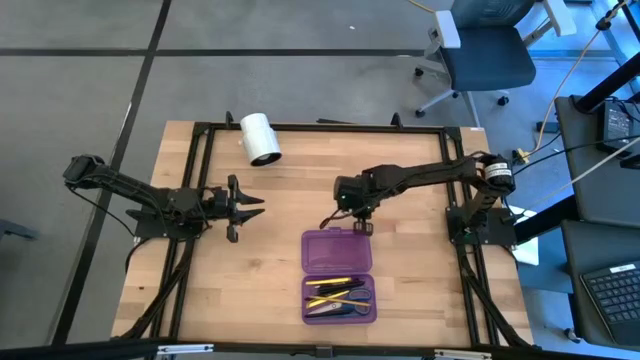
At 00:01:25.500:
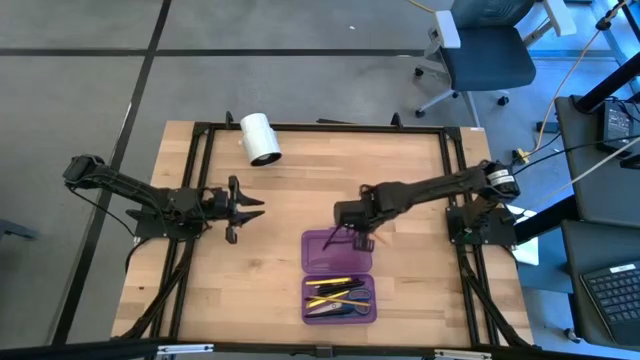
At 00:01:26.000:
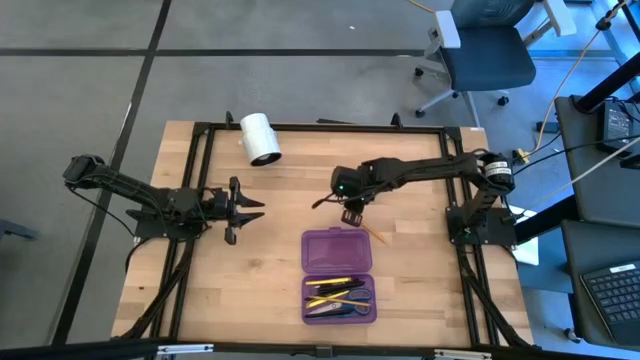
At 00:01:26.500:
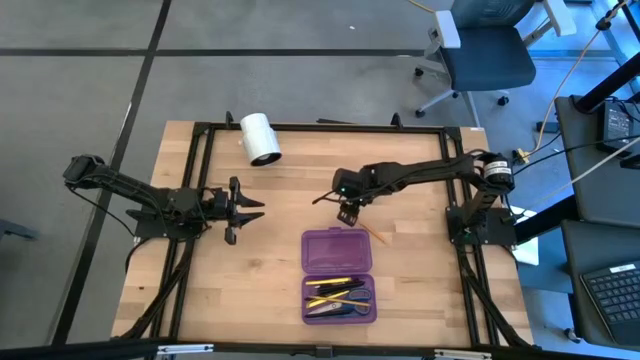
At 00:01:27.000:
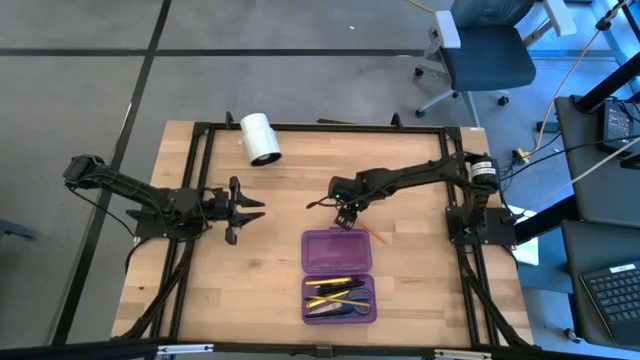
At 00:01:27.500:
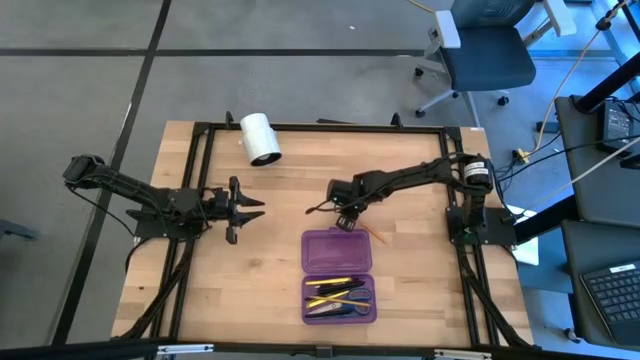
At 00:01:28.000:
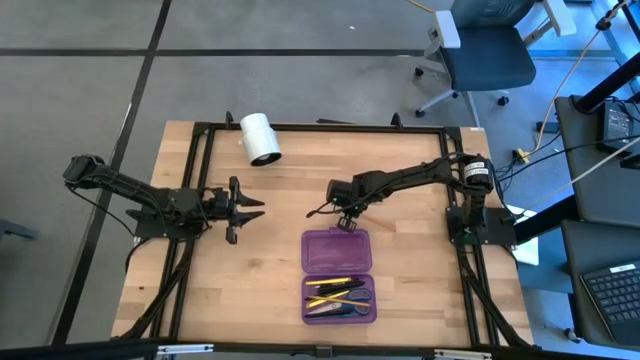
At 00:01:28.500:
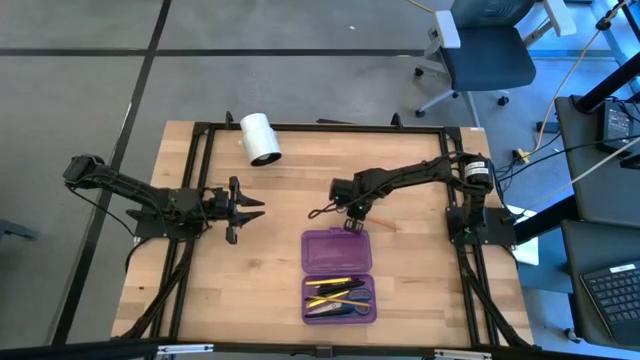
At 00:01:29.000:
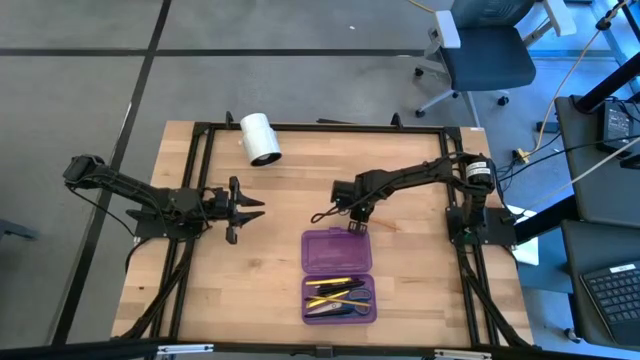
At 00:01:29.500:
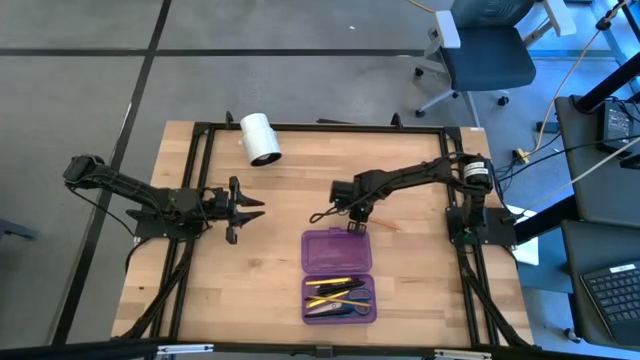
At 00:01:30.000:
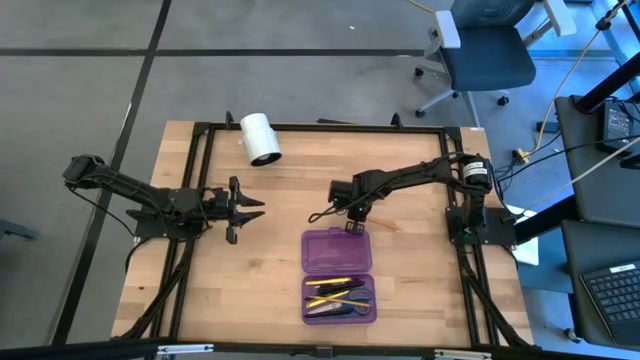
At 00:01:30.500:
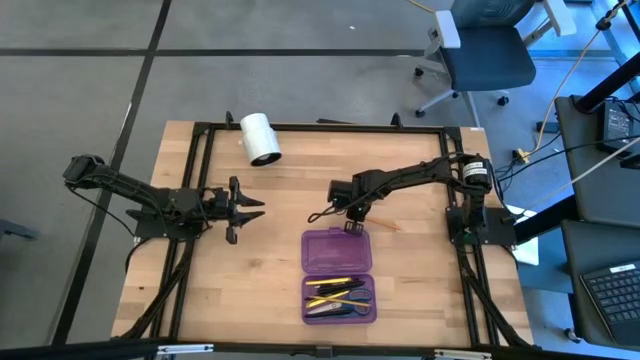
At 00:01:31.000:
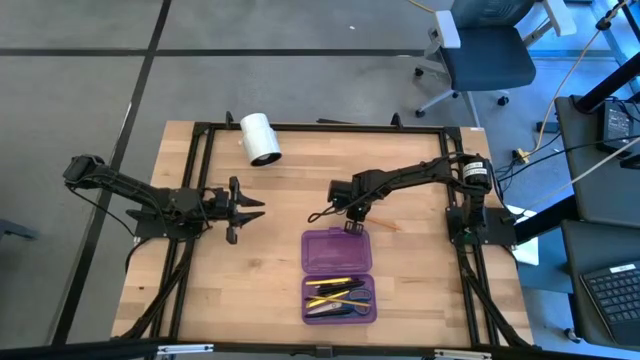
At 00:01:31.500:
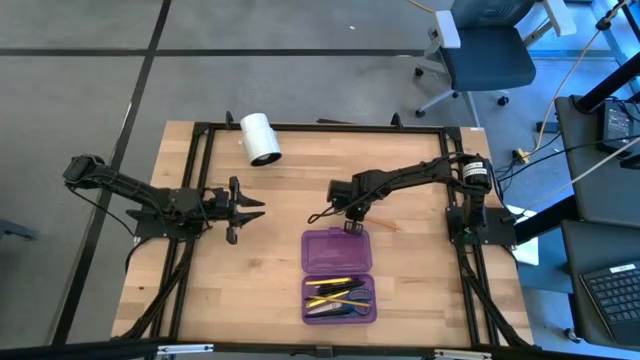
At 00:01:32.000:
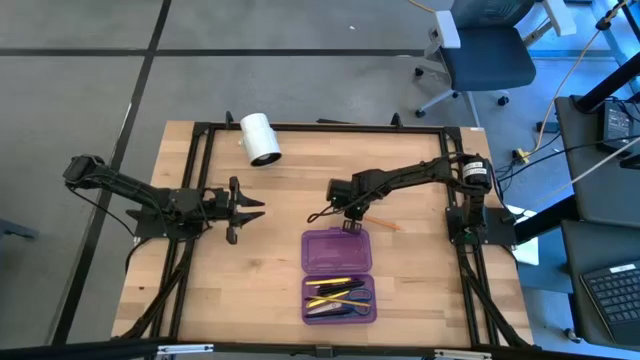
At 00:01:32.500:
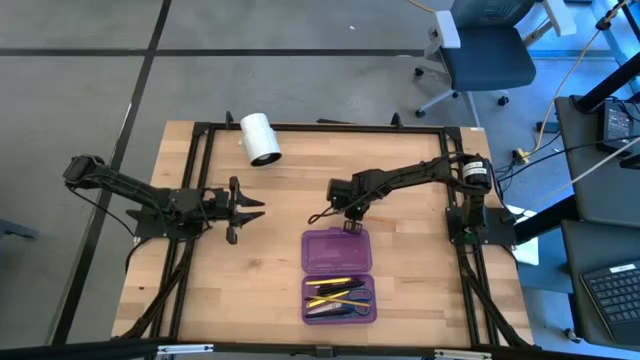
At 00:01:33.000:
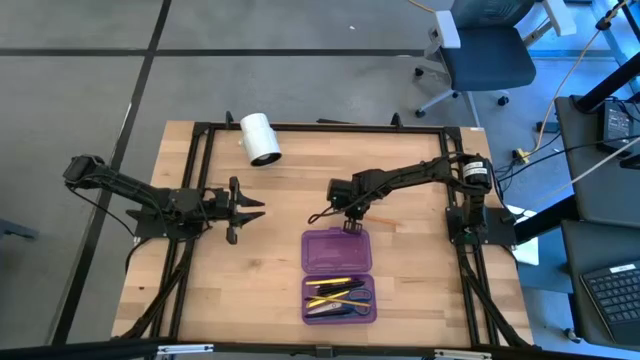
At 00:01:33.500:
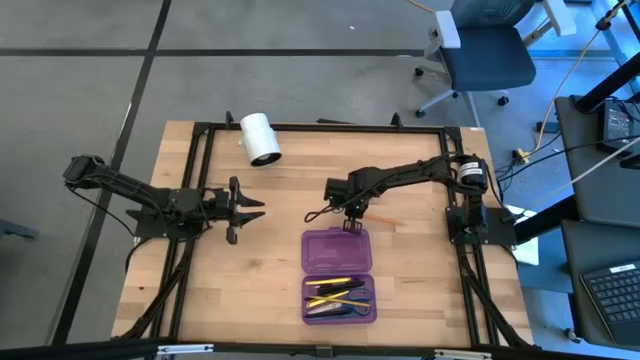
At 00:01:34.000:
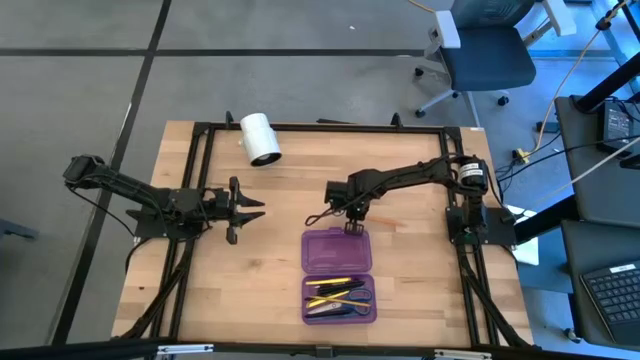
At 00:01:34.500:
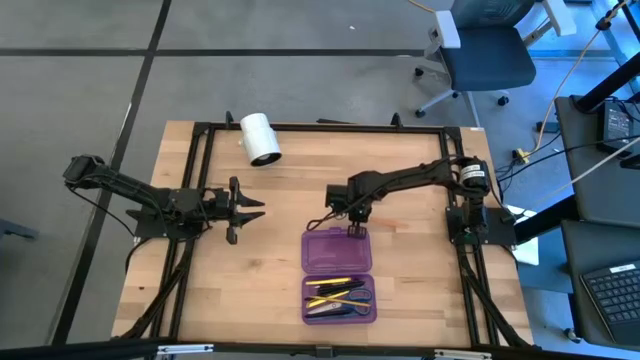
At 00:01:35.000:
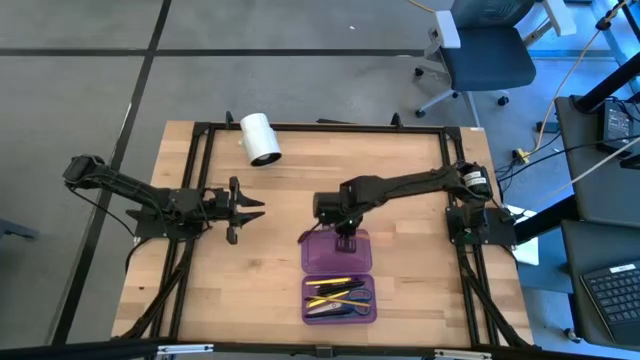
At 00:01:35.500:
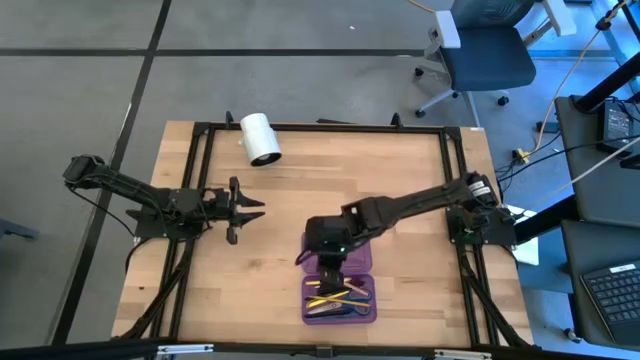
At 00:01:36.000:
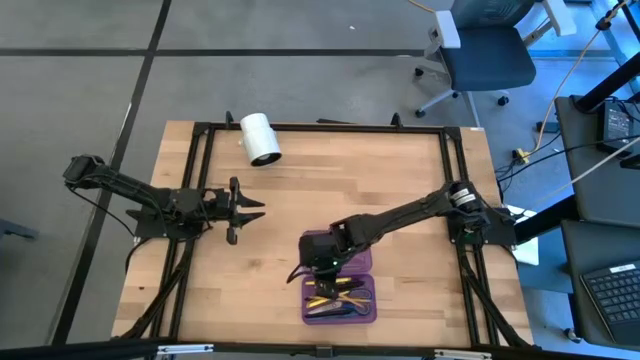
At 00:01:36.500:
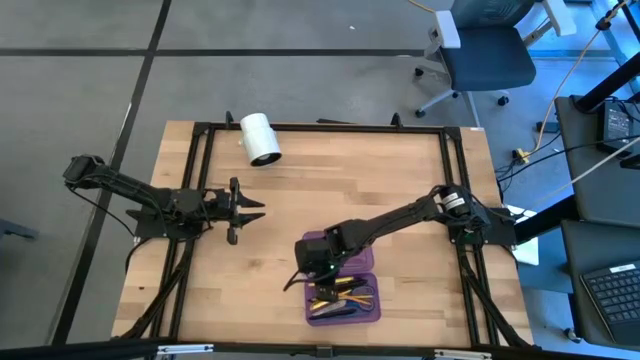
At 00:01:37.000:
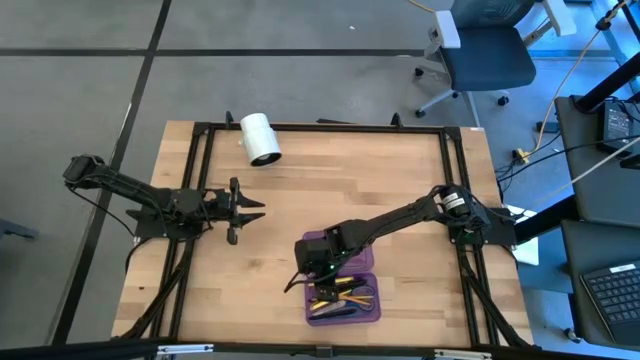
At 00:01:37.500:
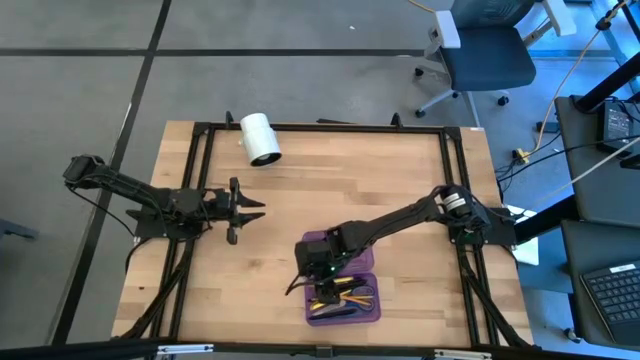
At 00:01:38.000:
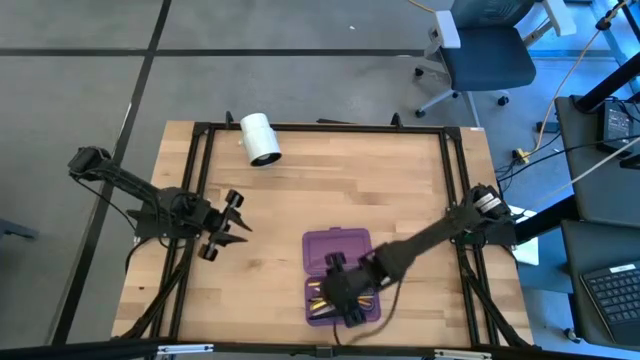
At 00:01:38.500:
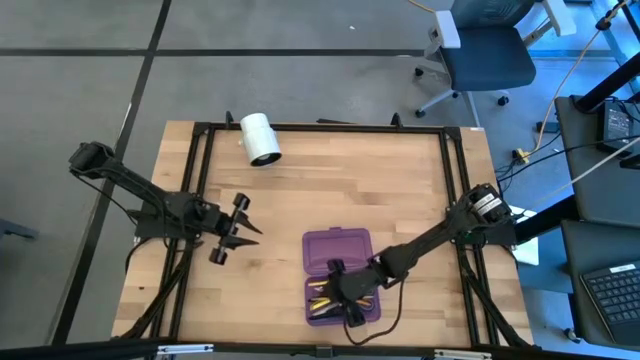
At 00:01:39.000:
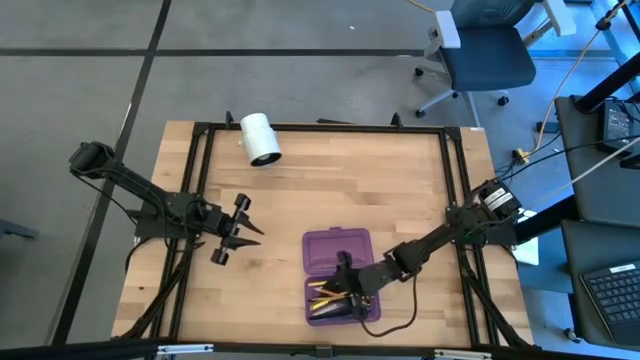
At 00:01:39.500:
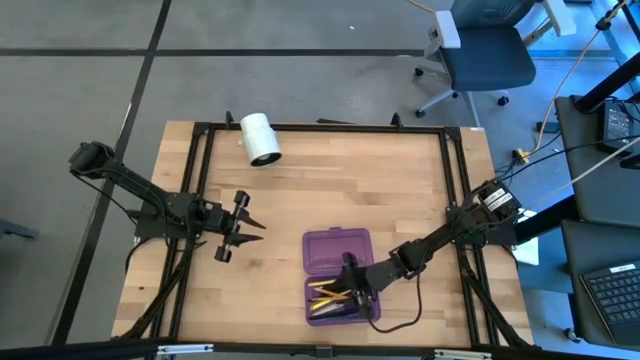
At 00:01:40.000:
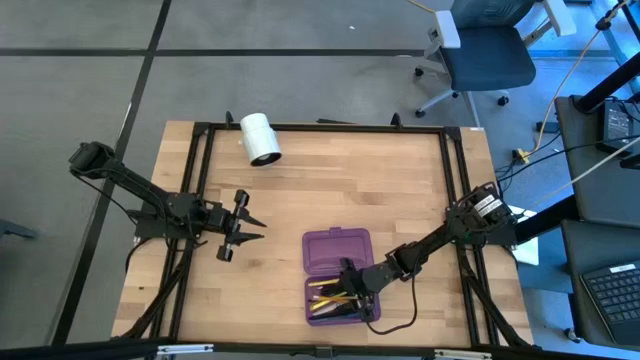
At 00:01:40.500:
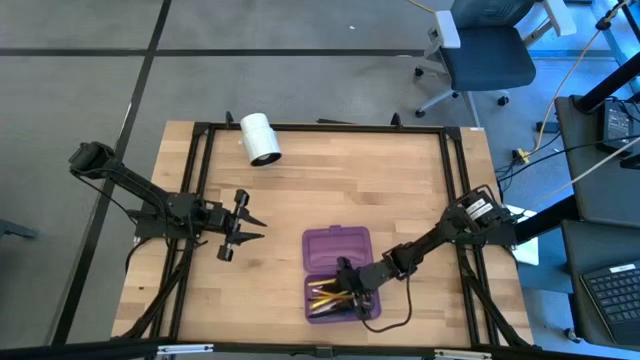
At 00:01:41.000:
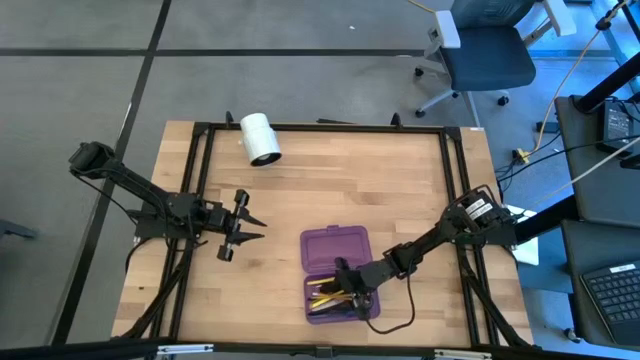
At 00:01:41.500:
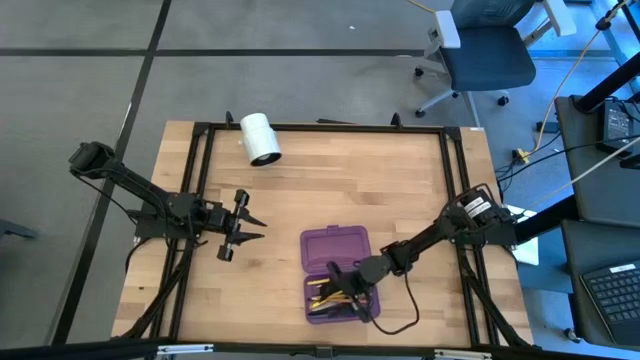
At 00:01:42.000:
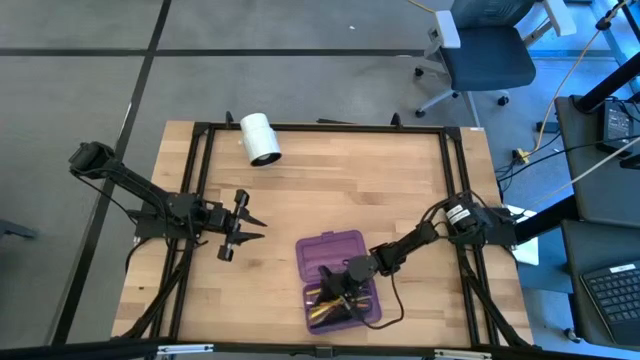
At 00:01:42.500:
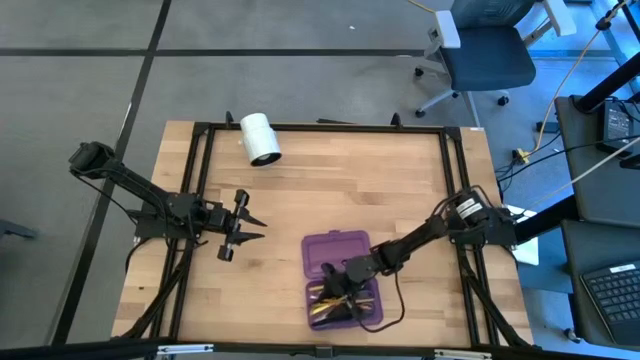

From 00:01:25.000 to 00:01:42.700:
Task: Pick & place school supplies into a supply box
Put the orange pencil into the purple supply box
